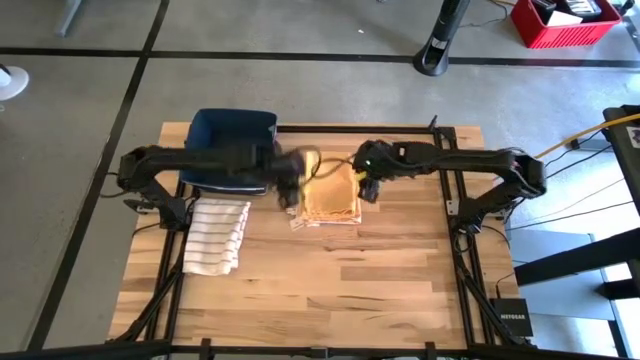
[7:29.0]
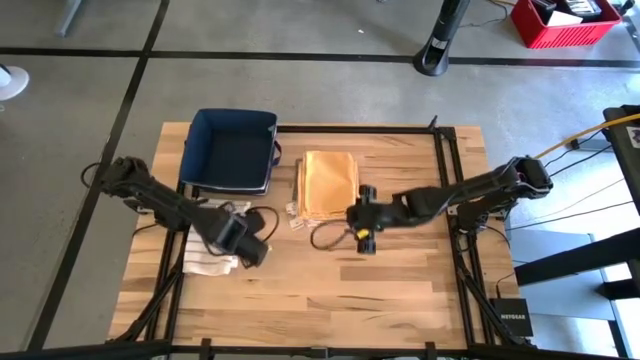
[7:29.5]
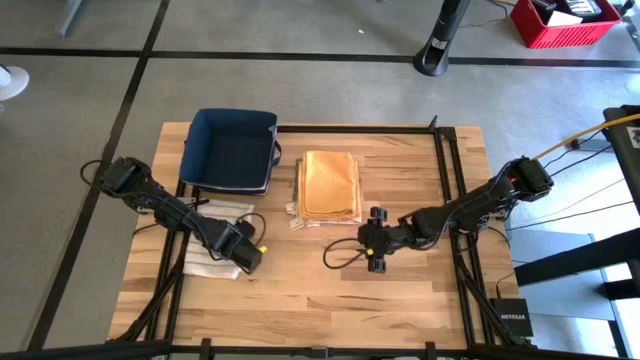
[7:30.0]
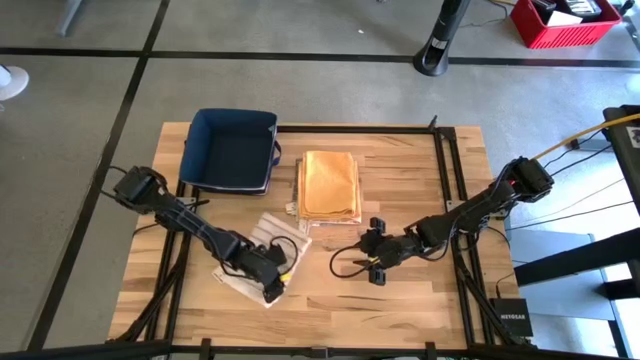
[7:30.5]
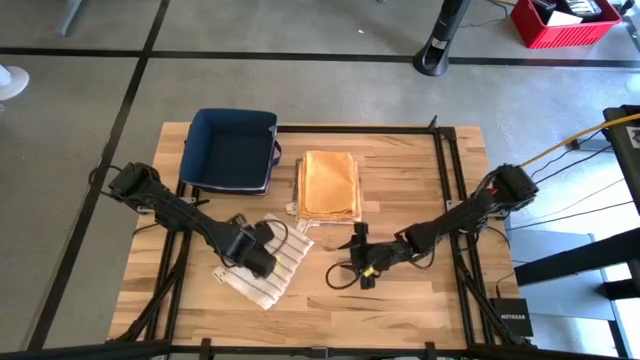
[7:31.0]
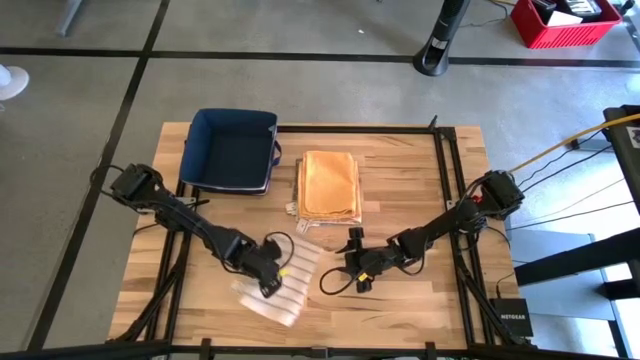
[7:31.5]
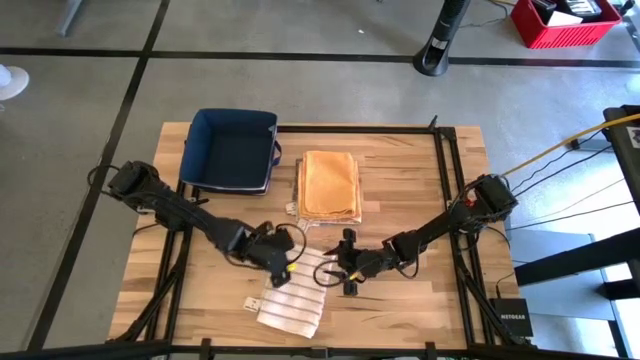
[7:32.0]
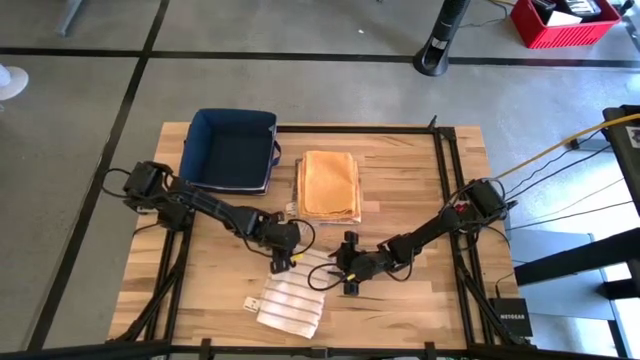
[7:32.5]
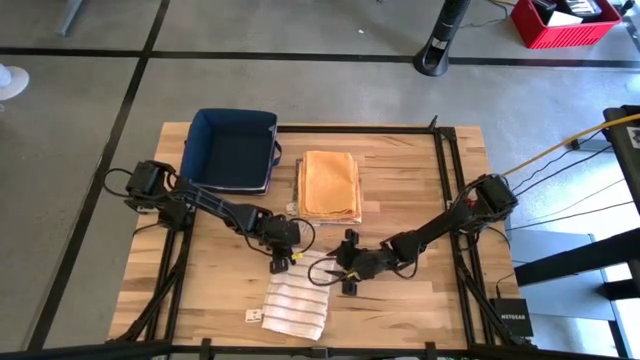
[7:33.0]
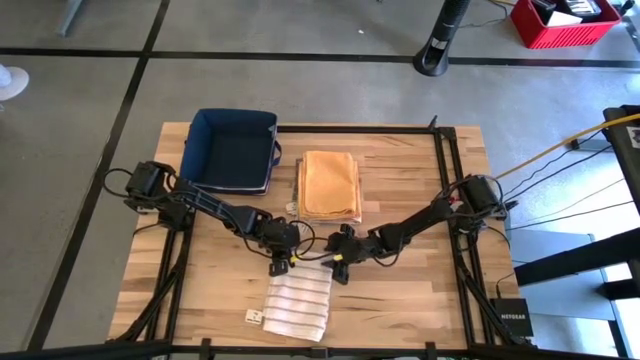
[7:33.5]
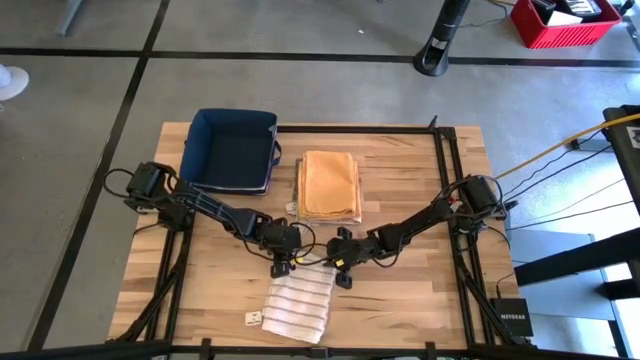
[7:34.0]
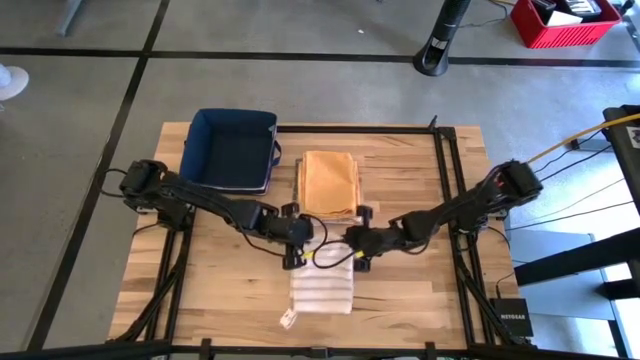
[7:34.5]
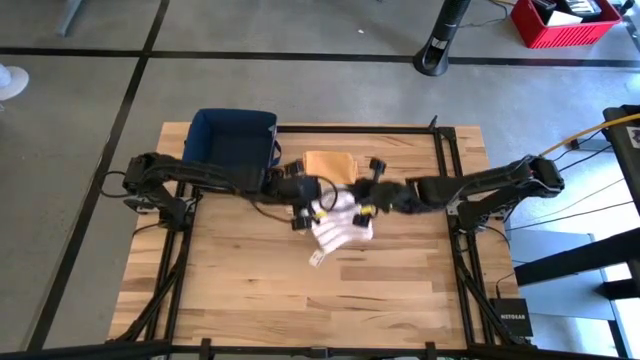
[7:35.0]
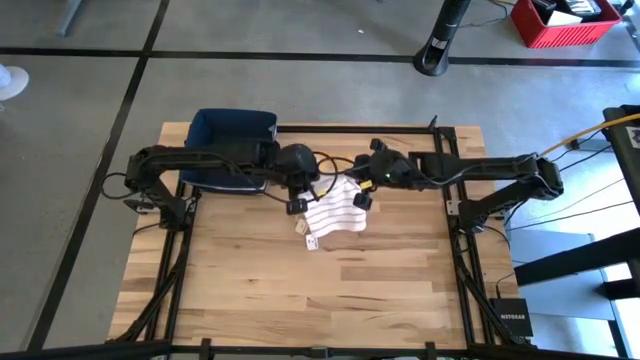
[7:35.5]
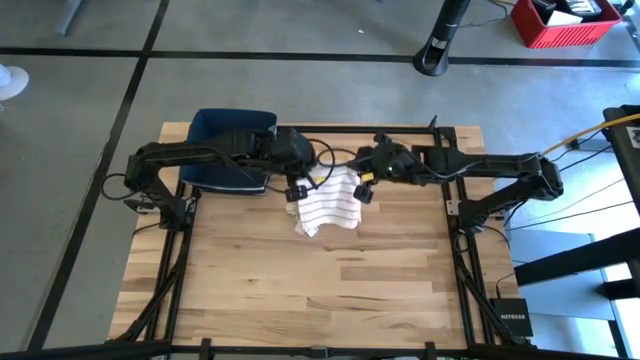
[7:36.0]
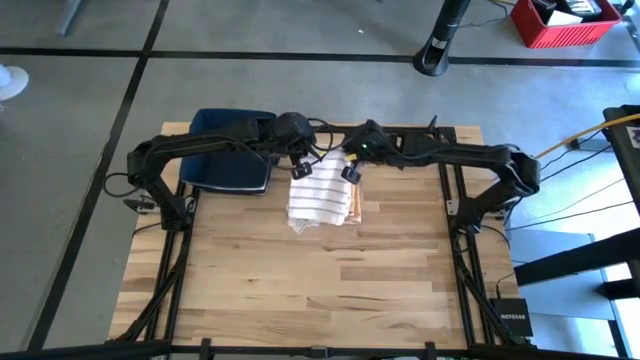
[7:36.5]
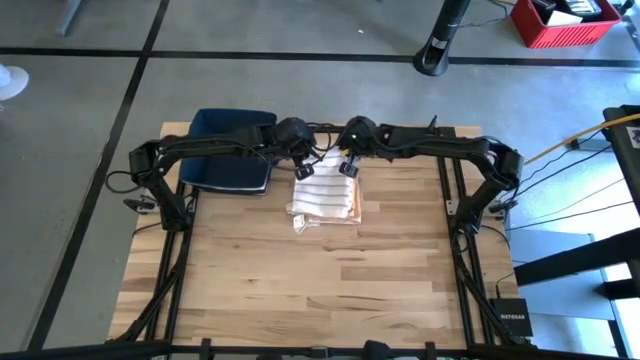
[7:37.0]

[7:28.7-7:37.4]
Task: Fold towel
Stack the white towel on the orange towel

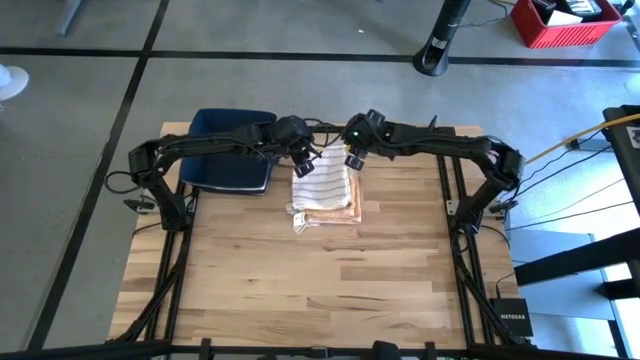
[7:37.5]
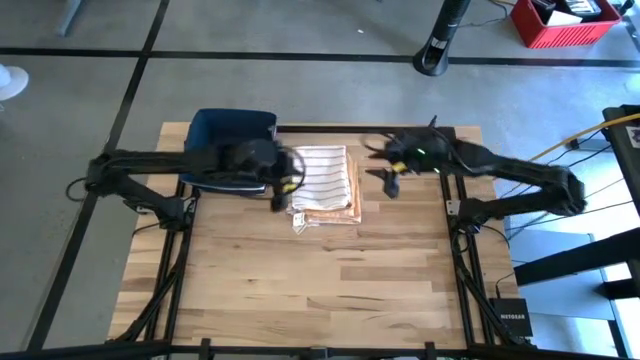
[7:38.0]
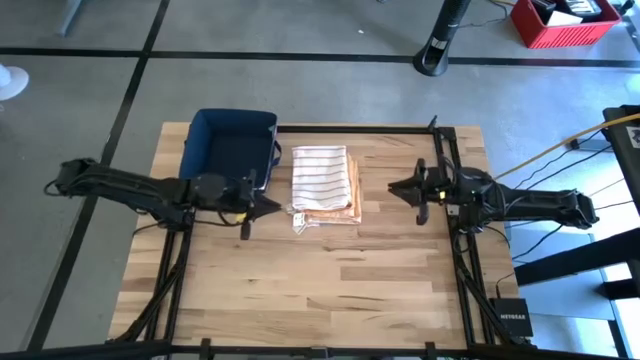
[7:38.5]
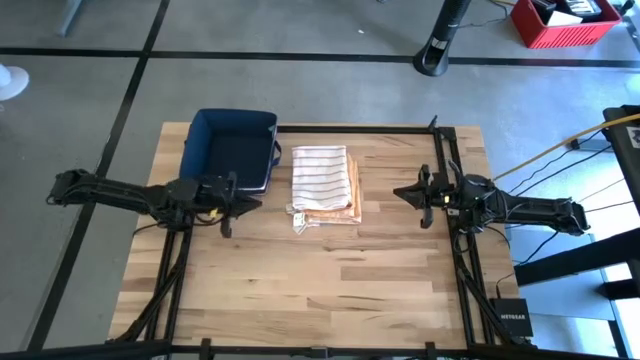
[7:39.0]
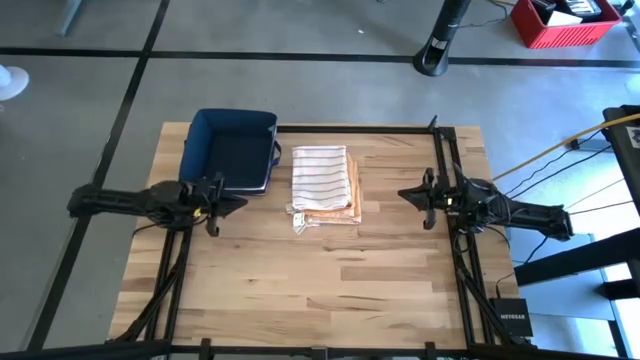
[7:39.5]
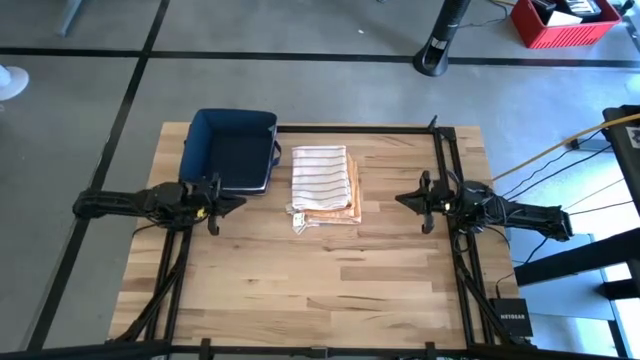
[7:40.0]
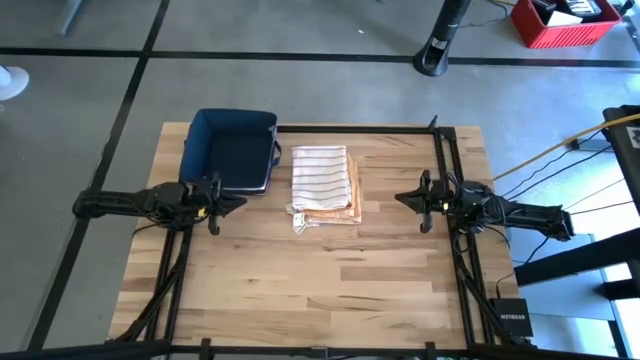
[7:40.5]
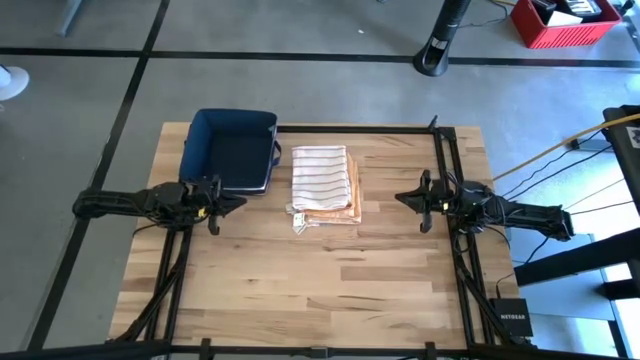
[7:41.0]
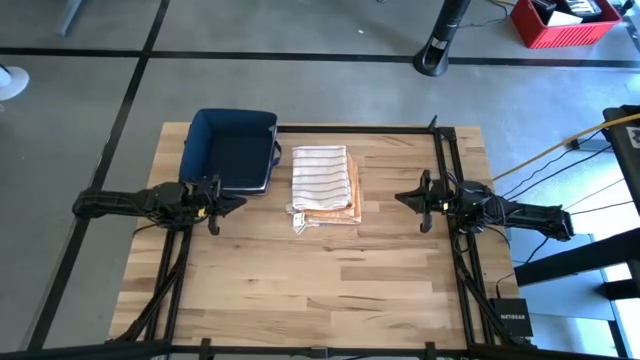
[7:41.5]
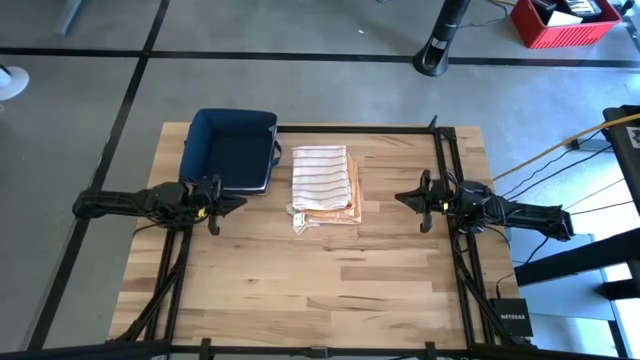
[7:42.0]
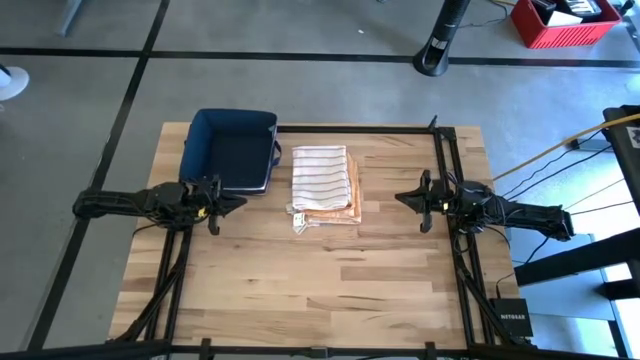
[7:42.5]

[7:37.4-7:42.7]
Return to Home Position

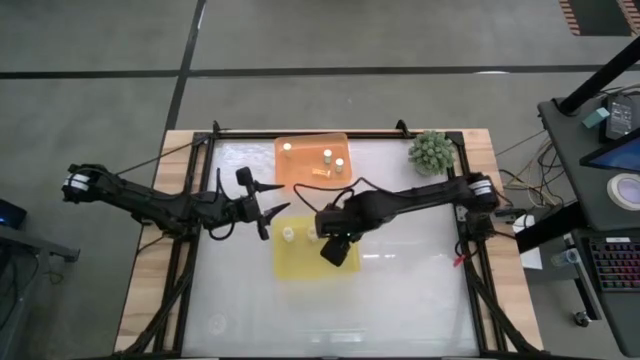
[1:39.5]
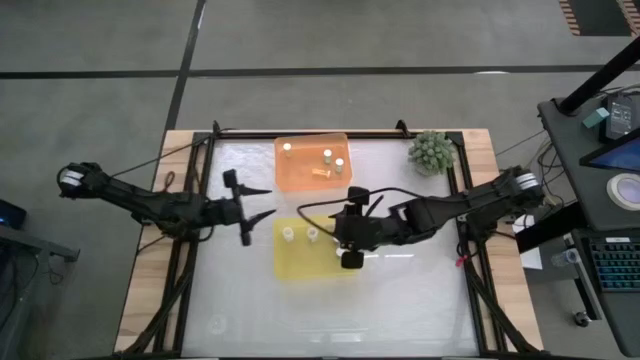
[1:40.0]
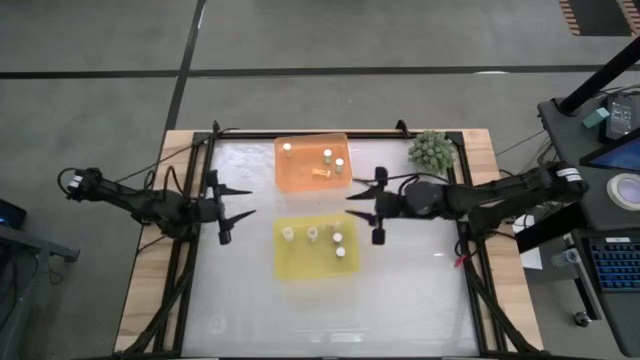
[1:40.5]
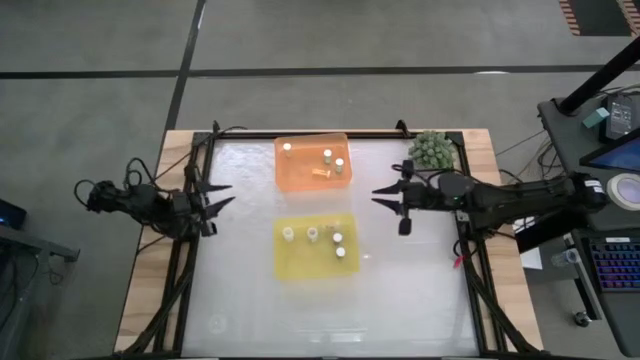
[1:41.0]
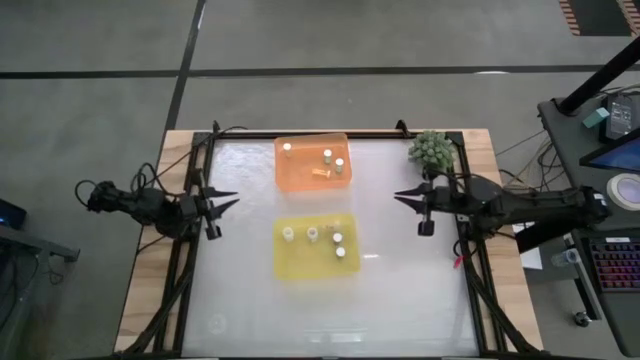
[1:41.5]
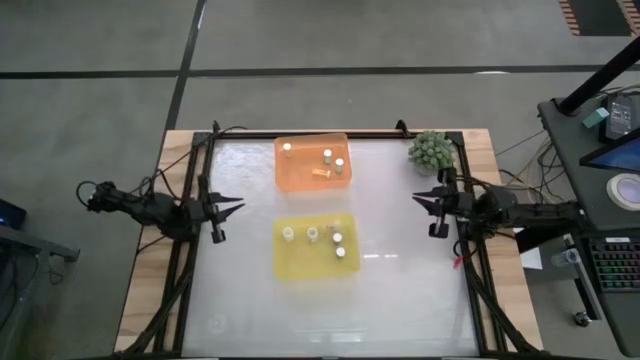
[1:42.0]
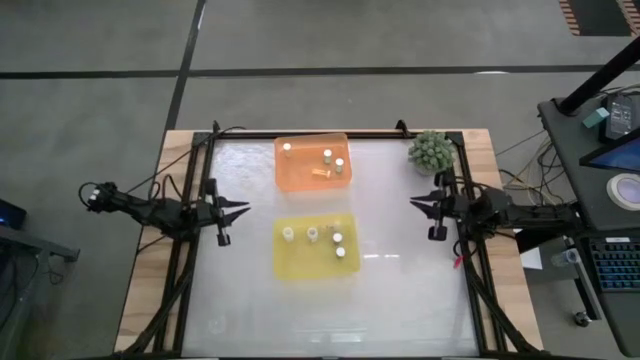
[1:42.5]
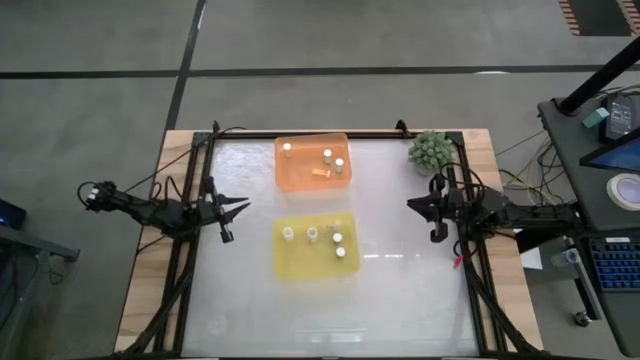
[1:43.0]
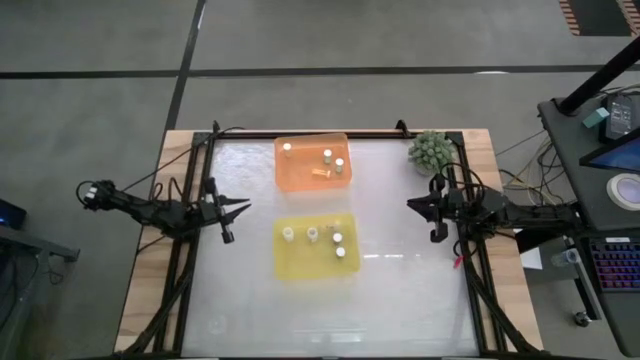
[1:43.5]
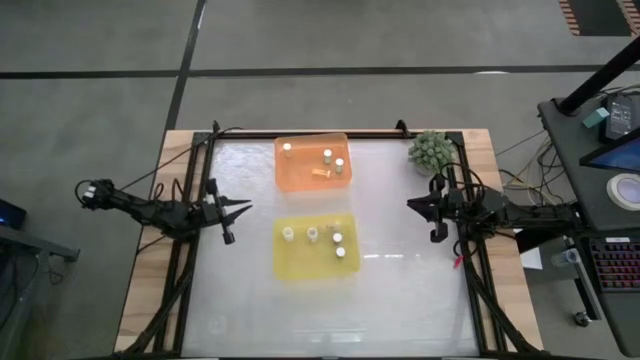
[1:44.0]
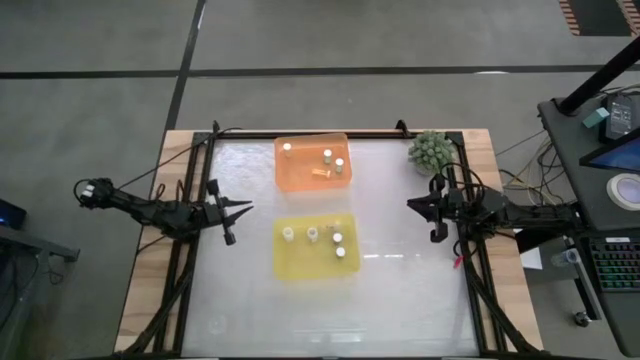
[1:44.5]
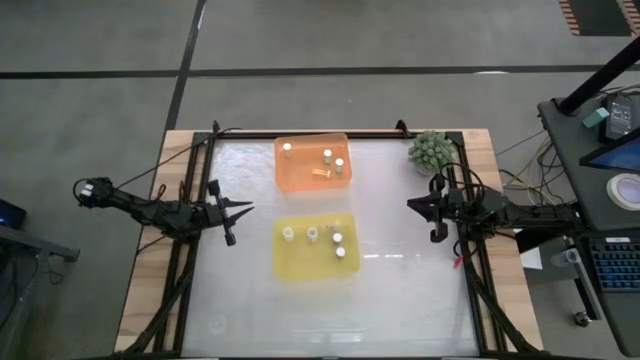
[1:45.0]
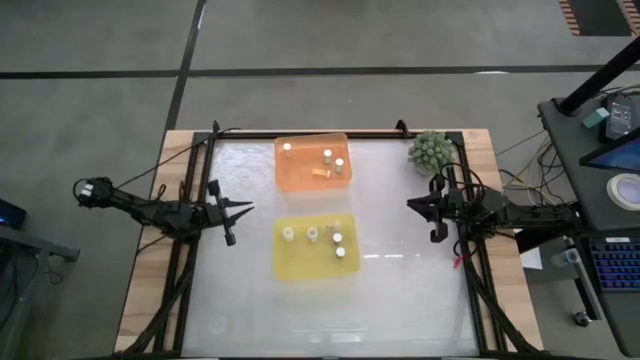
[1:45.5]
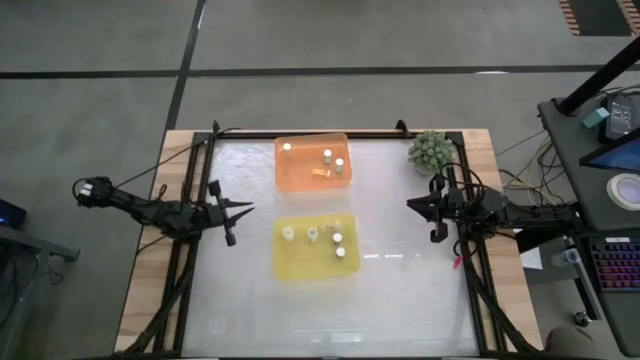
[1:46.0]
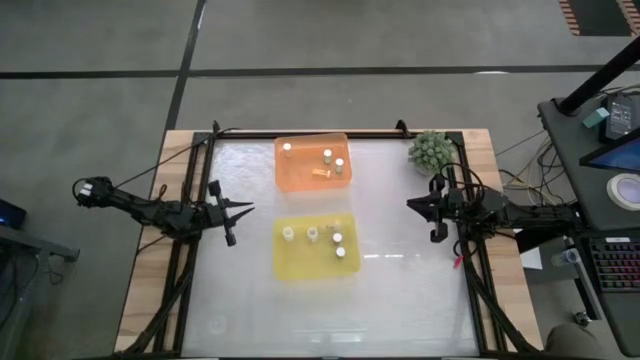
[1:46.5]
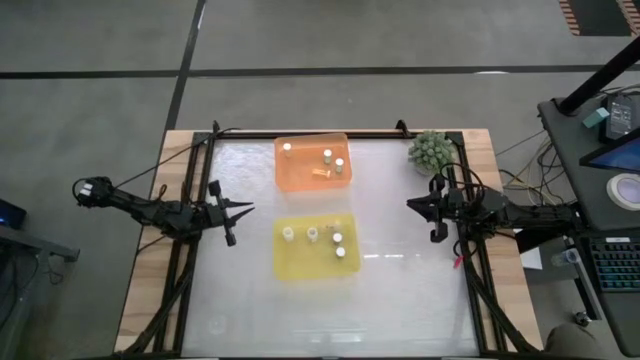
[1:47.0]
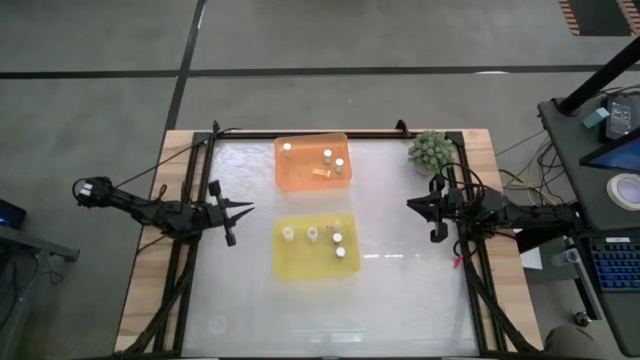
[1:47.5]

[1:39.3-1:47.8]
Task: Pick and place medicine bottles into bin by pill shape (circle, oval)
Return to Home Position
